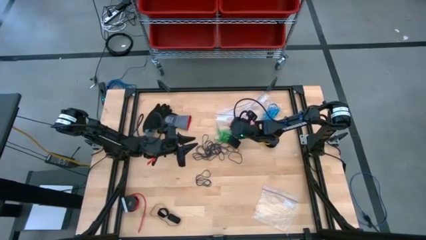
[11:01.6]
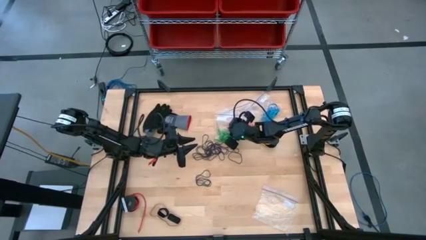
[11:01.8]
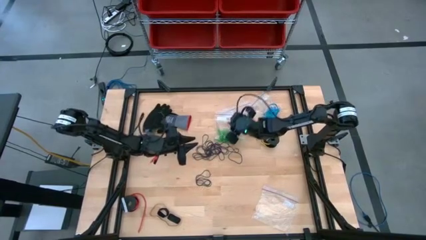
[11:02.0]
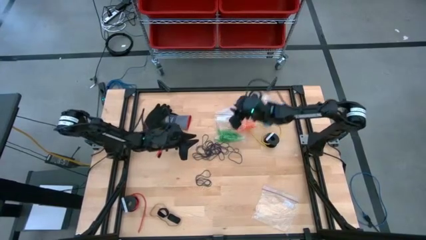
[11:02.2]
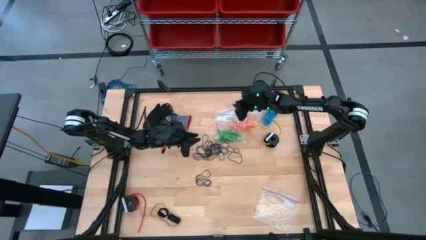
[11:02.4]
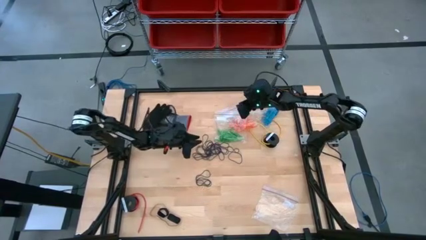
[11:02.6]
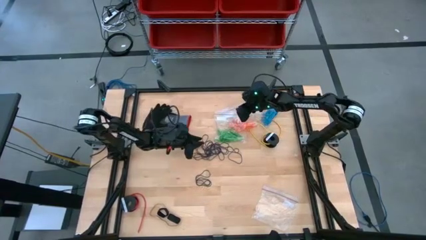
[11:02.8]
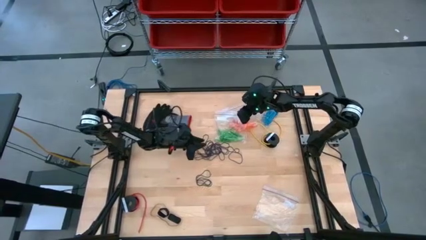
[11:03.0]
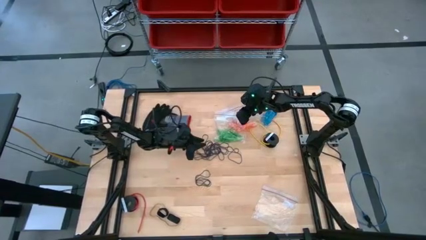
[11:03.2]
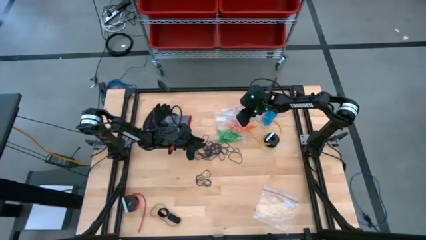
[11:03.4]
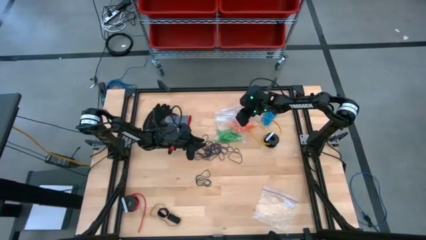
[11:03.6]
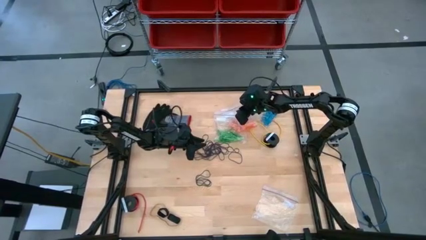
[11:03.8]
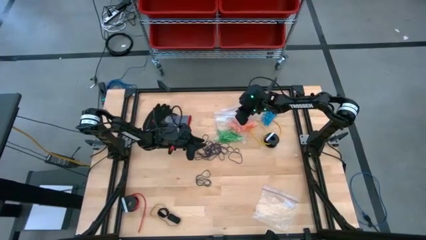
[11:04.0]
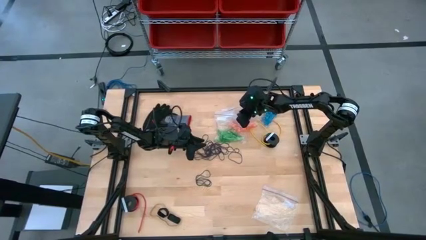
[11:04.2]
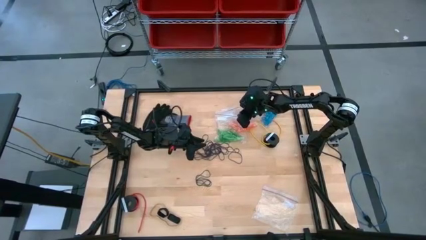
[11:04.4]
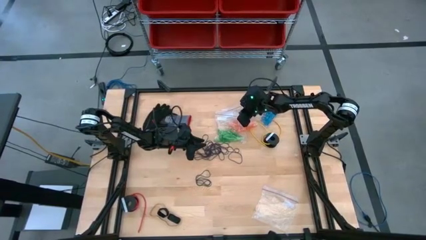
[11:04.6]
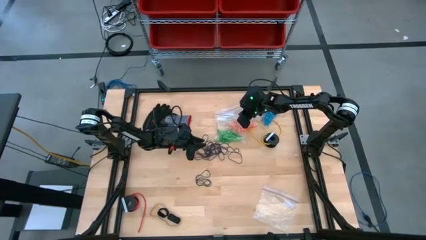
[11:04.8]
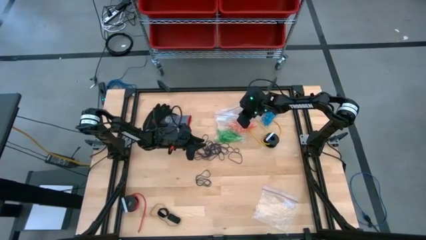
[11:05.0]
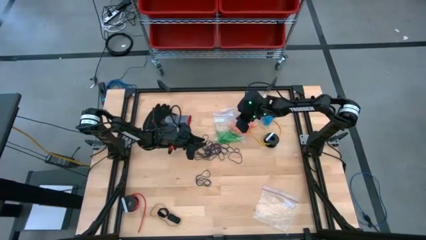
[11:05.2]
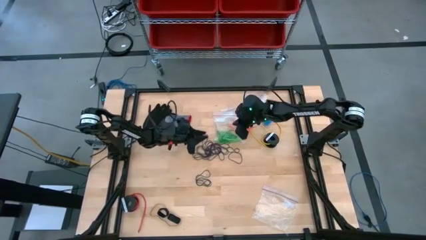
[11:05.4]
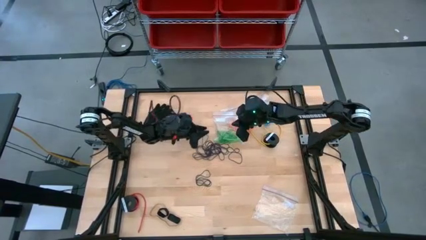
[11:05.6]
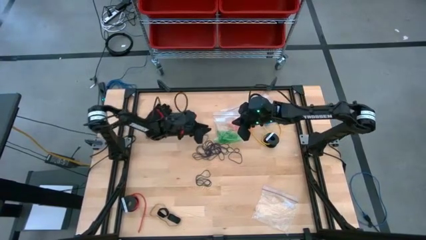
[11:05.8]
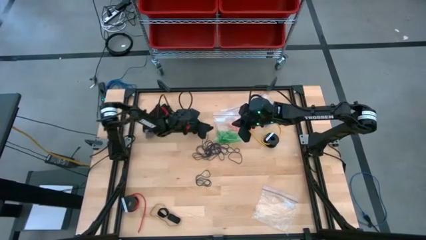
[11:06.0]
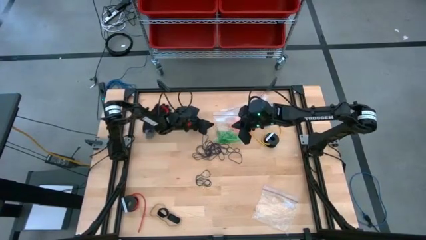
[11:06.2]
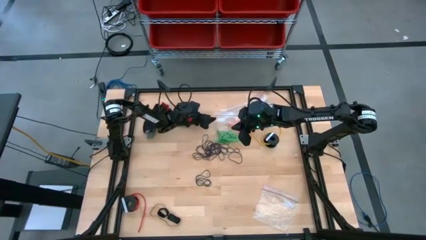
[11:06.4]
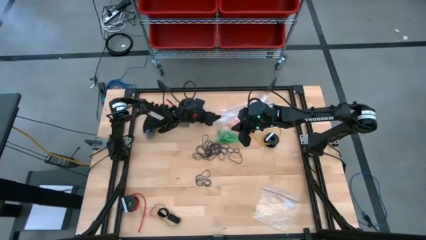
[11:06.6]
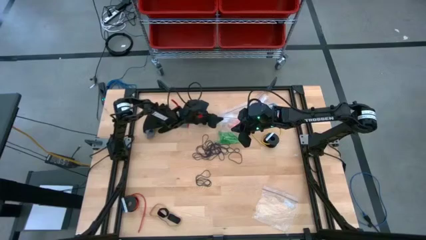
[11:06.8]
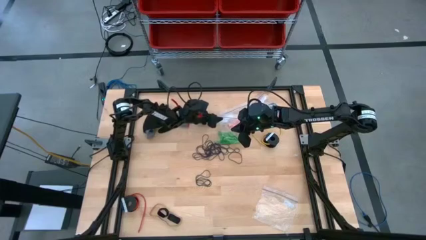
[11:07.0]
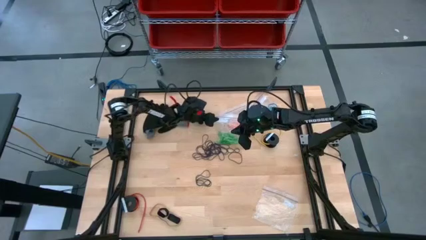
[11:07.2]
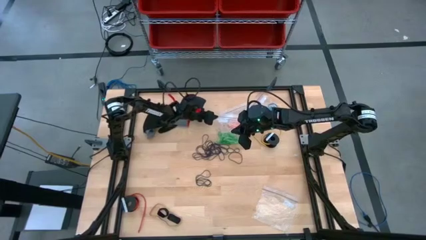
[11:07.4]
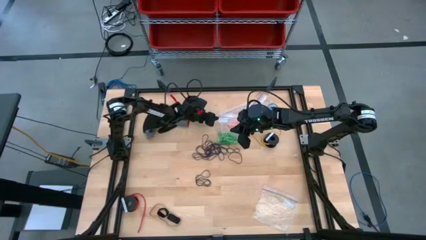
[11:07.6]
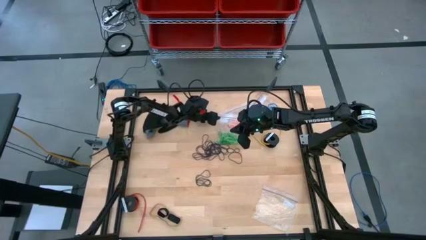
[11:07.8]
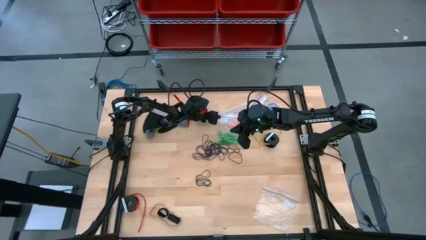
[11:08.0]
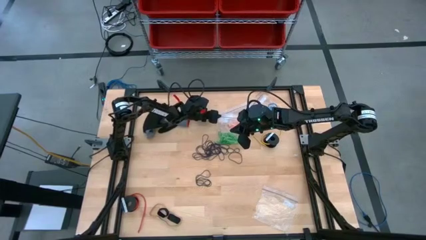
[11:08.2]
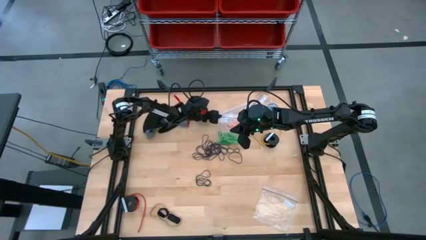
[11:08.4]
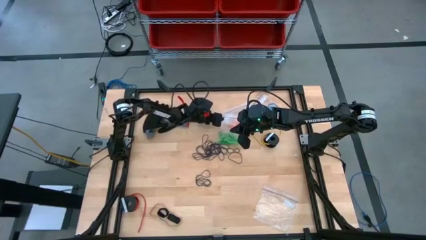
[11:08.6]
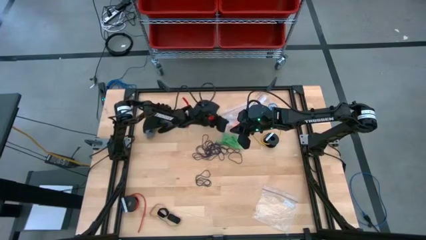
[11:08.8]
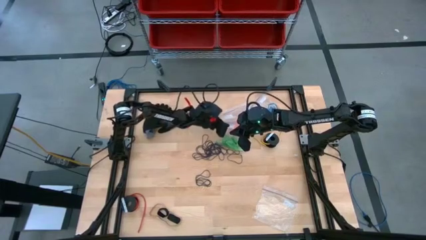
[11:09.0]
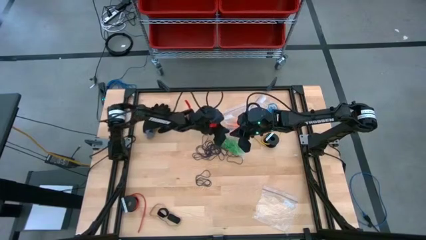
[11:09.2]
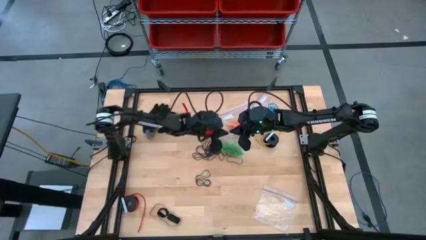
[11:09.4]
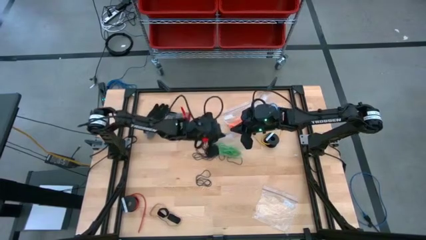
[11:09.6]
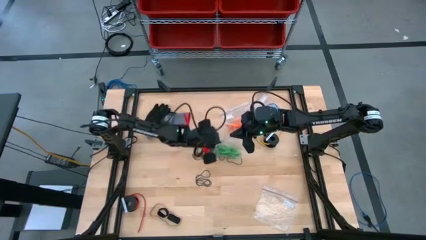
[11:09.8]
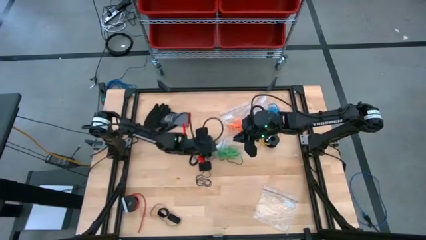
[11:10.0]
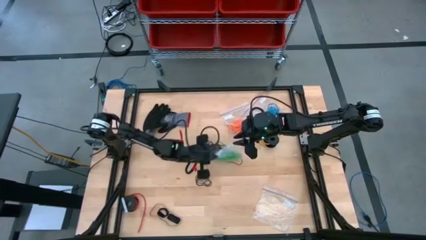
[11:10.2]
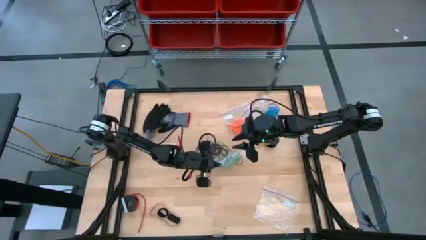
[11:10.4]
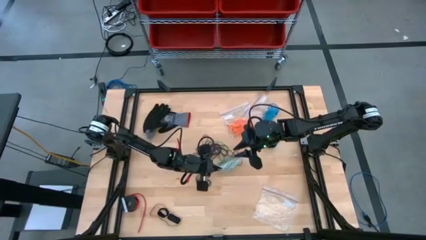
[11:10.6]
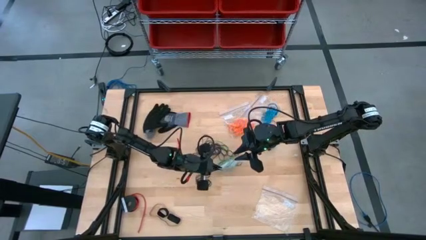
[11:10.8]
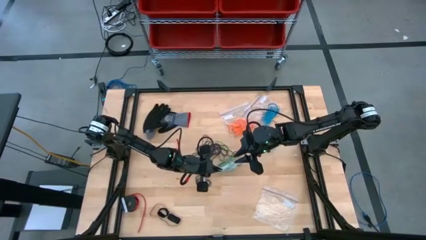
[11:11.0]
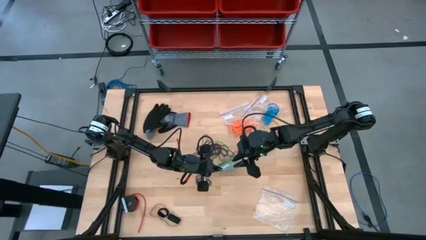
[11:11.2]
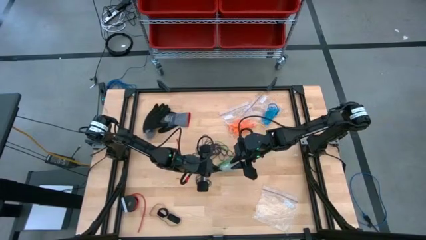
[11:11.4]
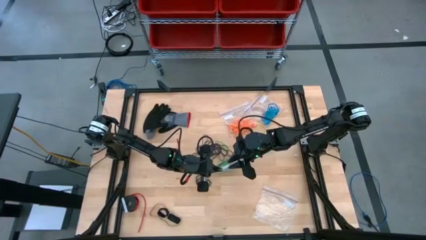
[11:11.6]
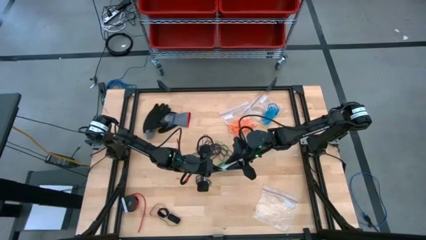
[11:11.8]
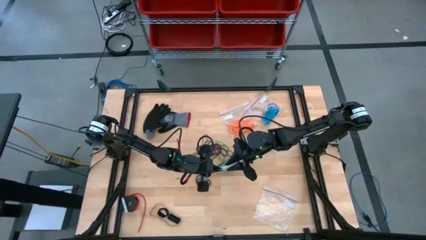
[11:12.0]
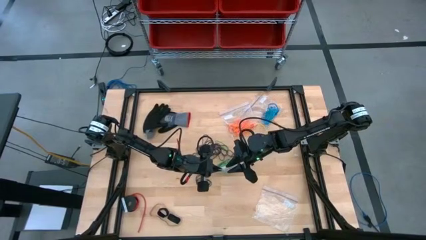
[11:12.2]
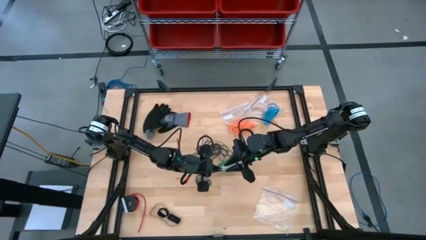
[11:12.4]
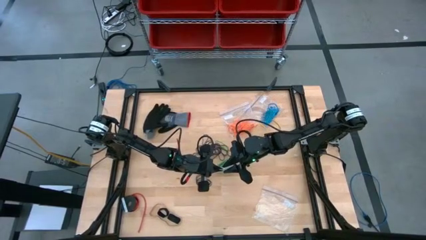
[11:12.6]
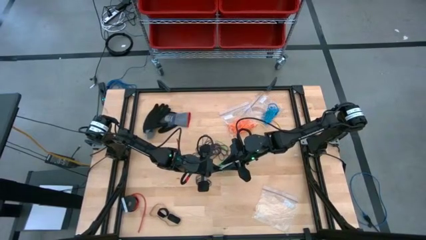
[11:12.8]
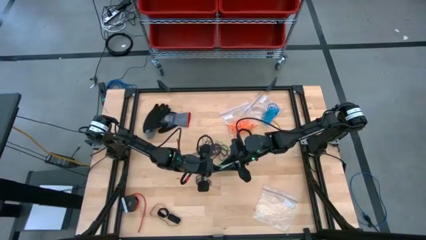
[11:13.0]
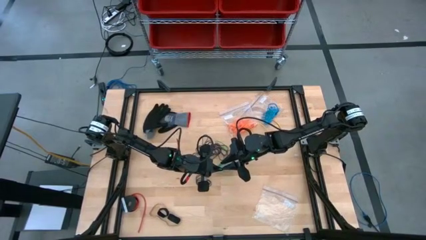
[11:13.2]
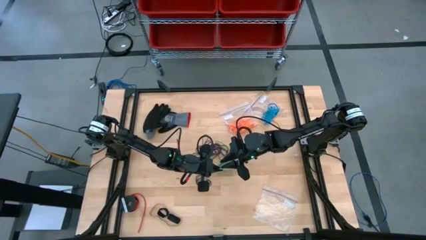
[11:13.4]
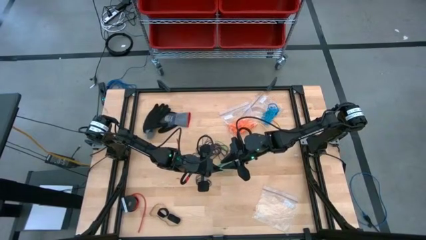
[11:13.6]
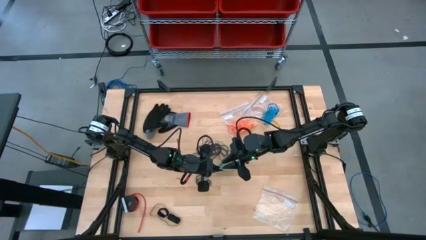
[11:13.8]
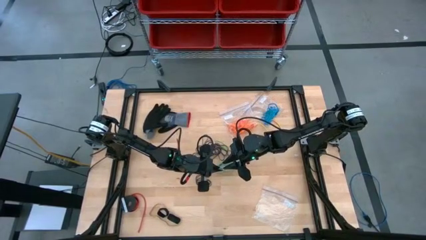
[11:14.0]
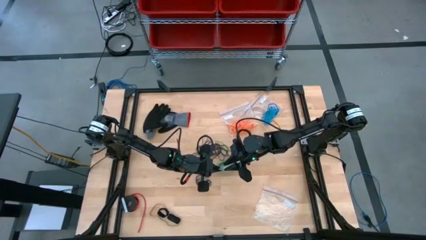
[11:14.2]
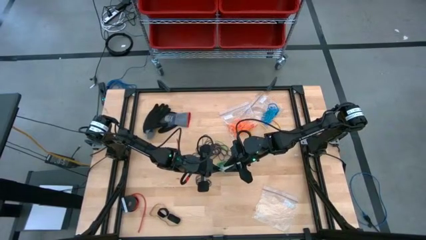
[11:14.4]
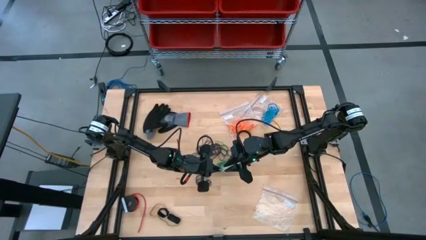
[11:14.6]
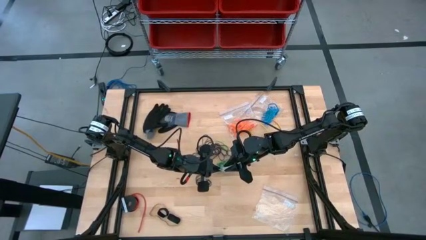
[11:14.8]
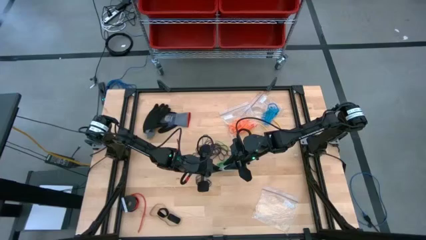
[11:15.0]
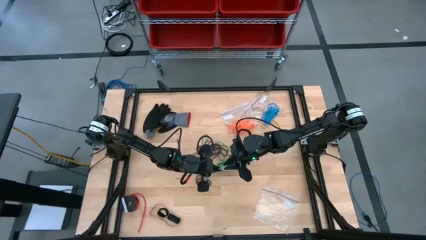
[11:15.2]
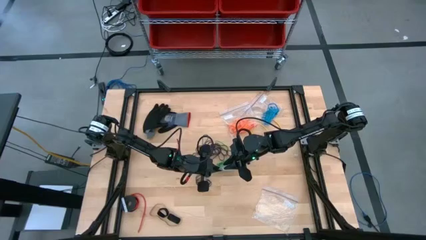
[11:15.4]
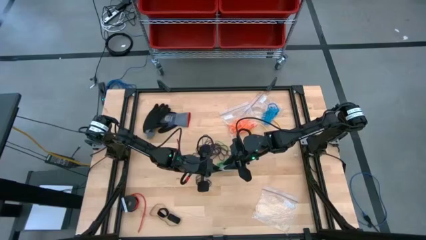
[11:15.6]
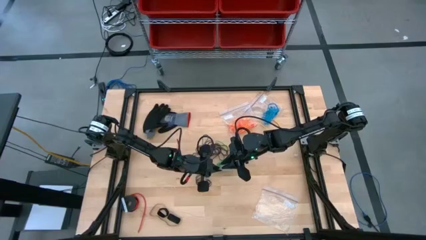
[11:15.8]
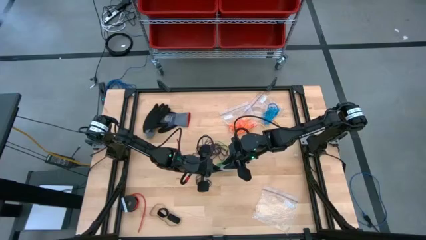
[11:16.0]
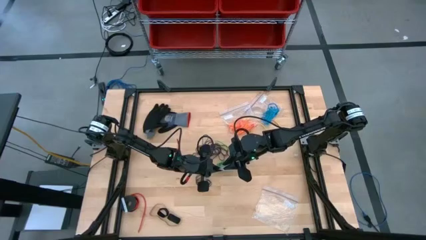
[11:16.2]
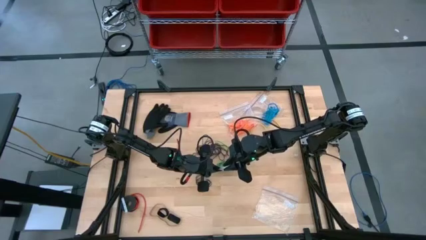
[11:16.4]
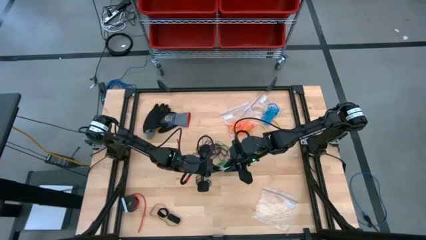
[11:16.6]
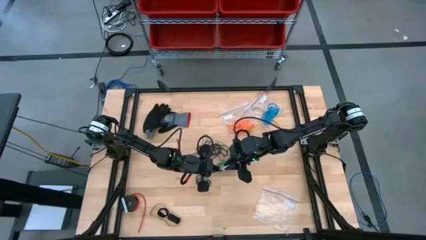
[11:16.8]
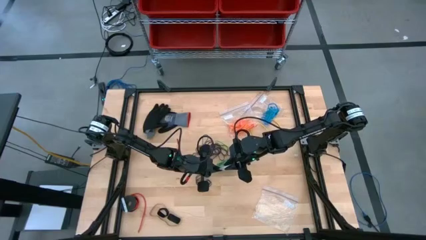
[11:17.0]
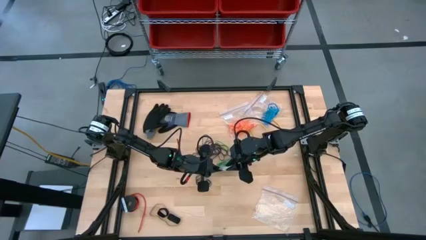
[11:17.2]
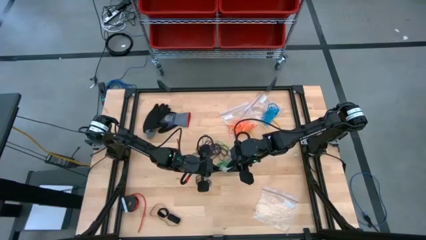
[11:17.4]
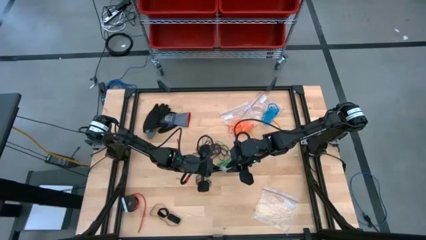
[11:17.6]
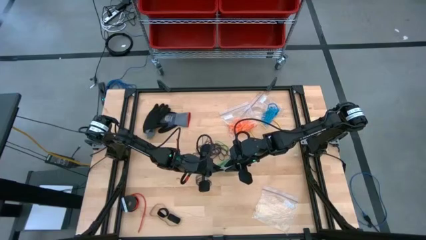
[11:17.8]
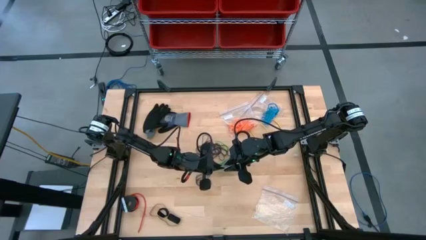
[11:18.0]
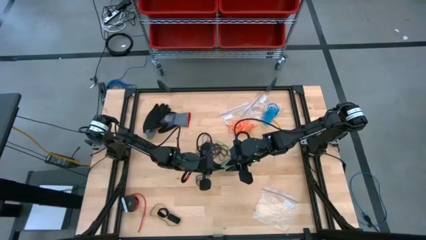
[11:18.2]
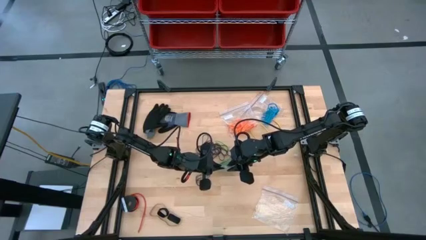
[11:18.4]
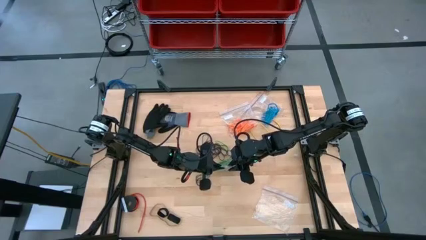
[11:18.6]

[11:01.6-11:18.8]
Task: Sort rubber bands
Open the transparent zip bag
